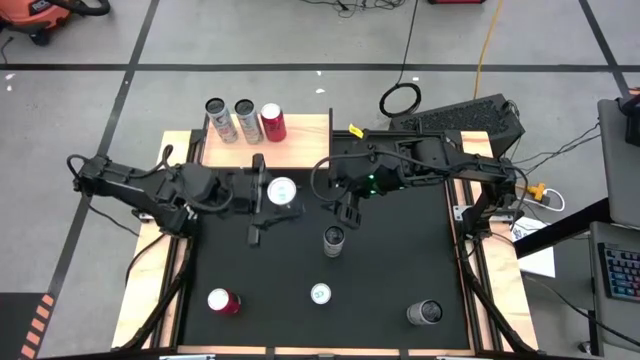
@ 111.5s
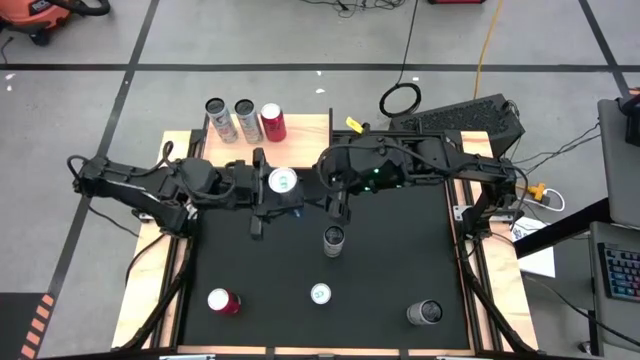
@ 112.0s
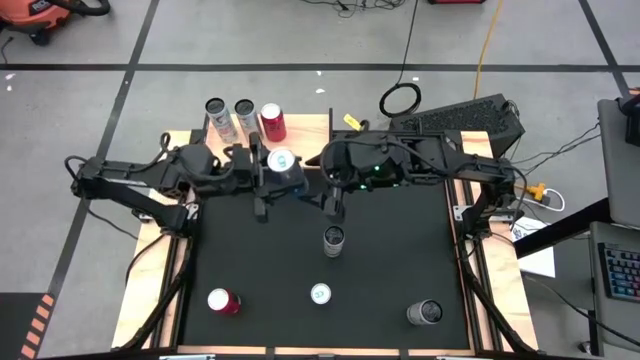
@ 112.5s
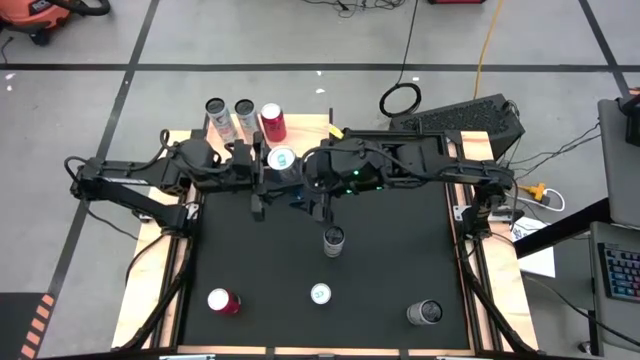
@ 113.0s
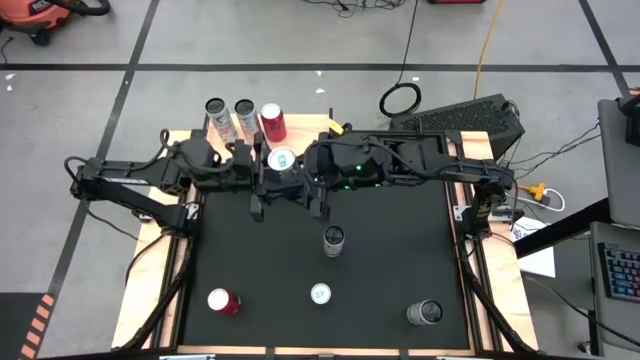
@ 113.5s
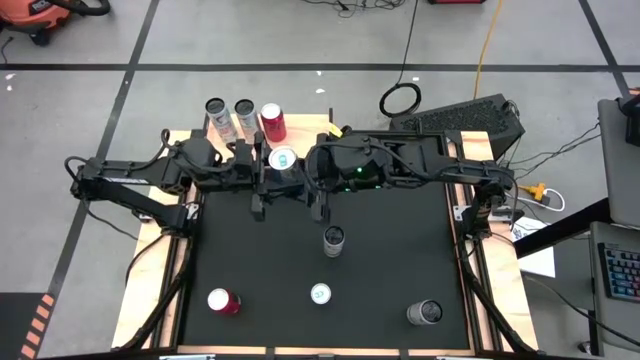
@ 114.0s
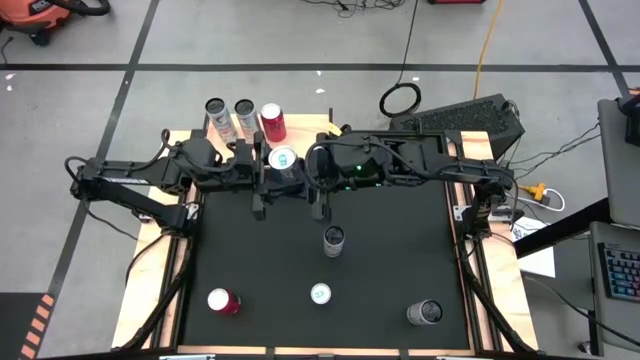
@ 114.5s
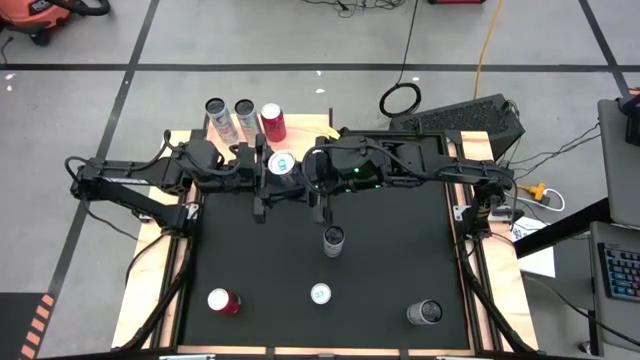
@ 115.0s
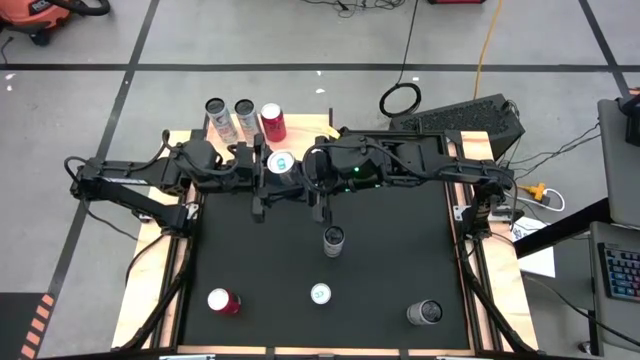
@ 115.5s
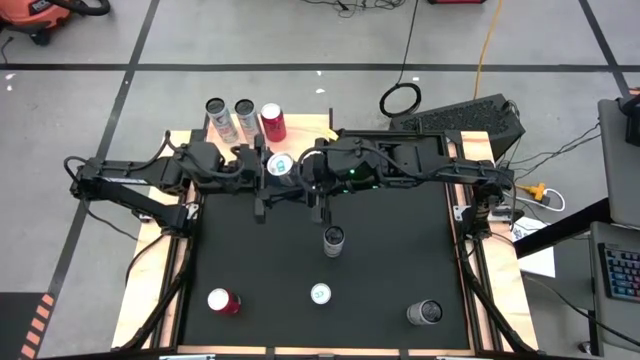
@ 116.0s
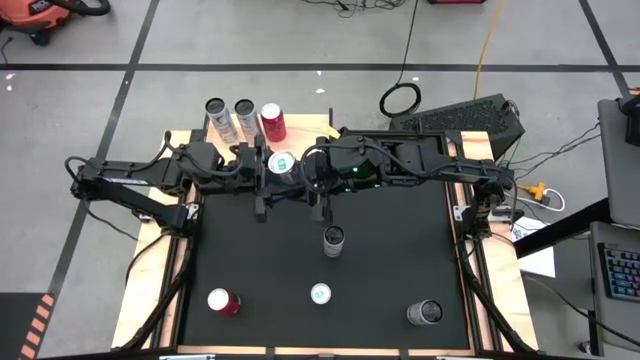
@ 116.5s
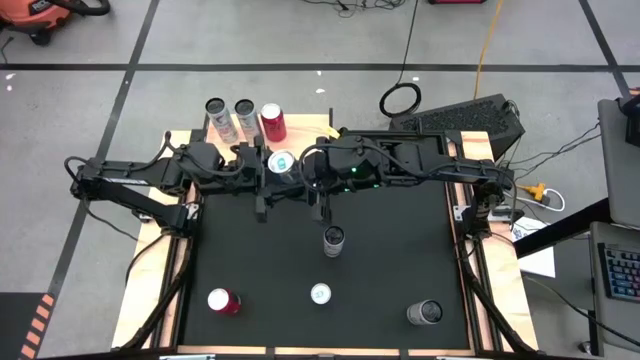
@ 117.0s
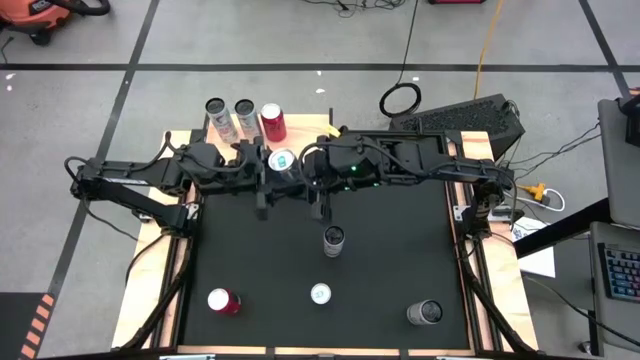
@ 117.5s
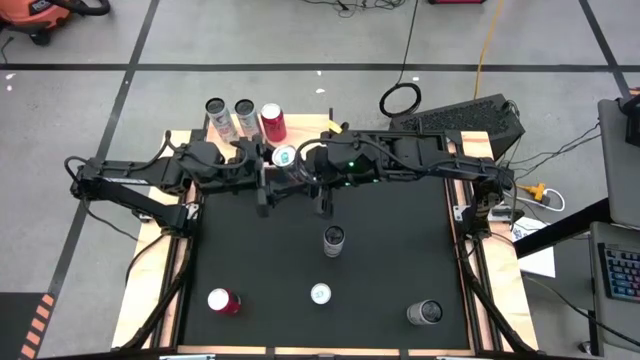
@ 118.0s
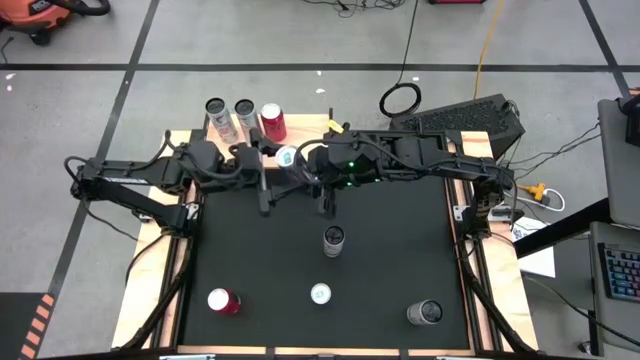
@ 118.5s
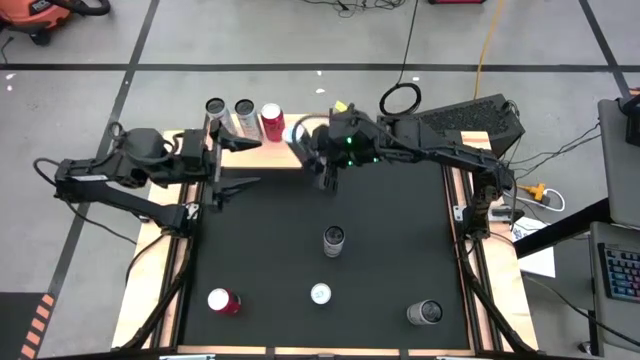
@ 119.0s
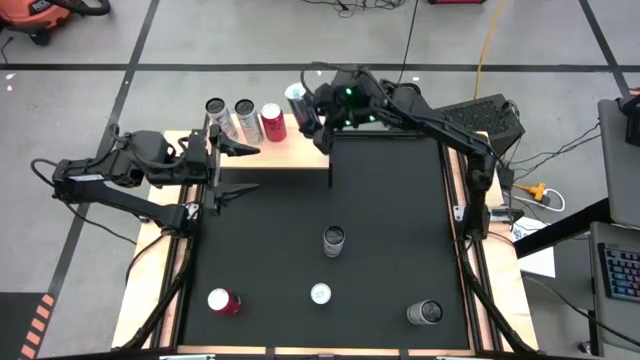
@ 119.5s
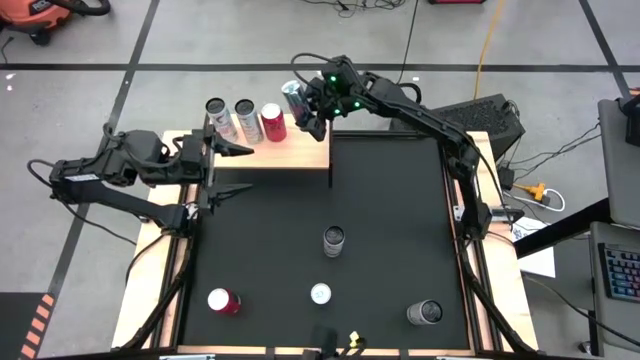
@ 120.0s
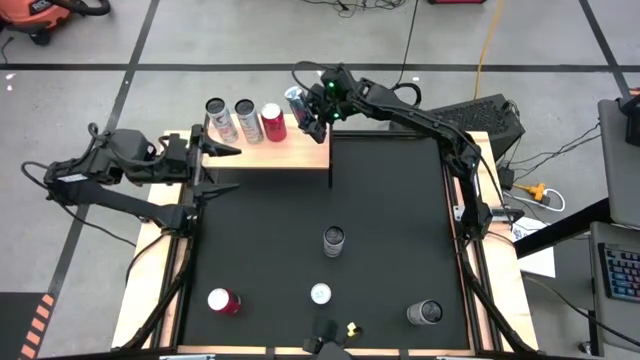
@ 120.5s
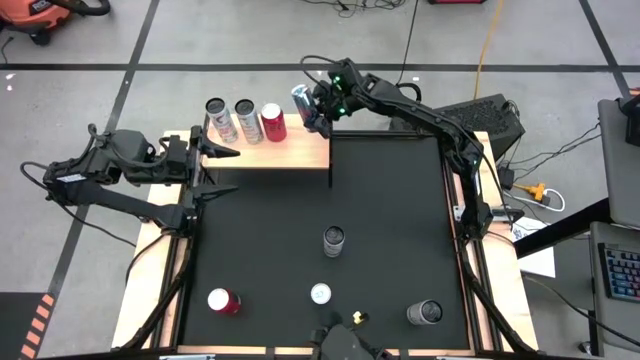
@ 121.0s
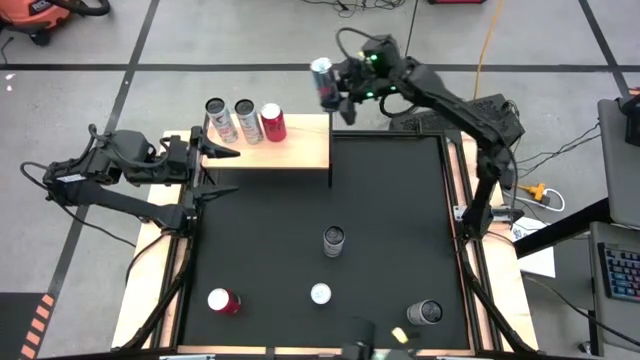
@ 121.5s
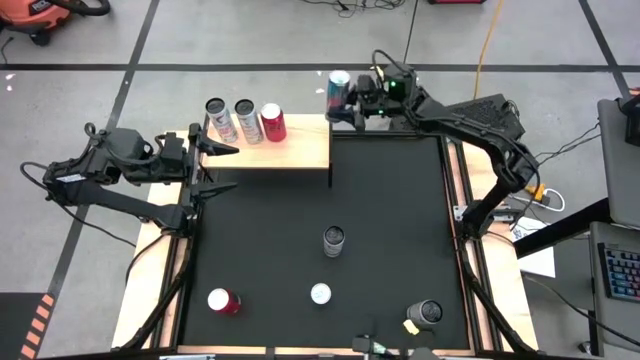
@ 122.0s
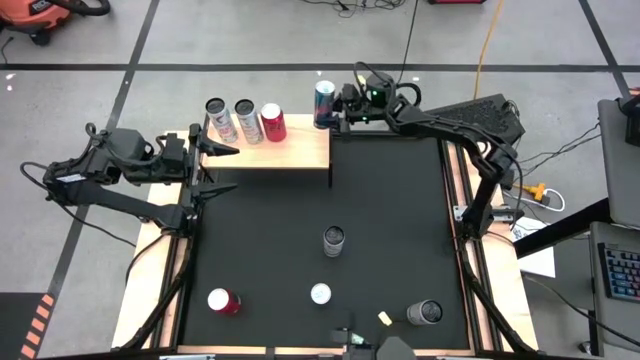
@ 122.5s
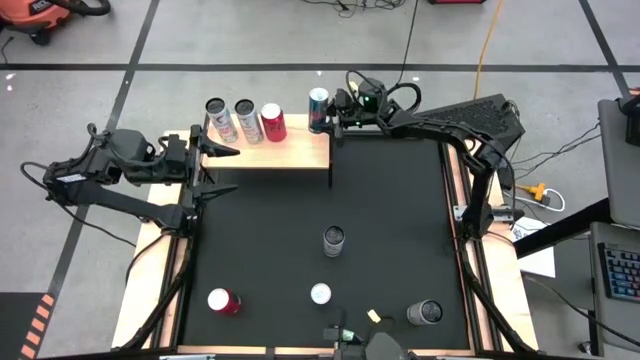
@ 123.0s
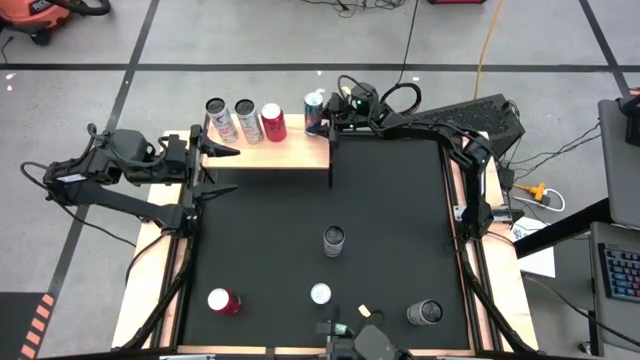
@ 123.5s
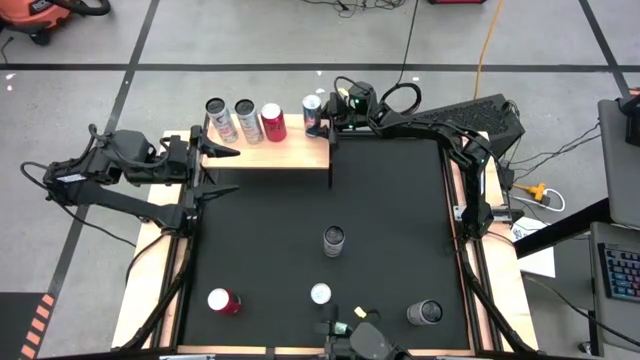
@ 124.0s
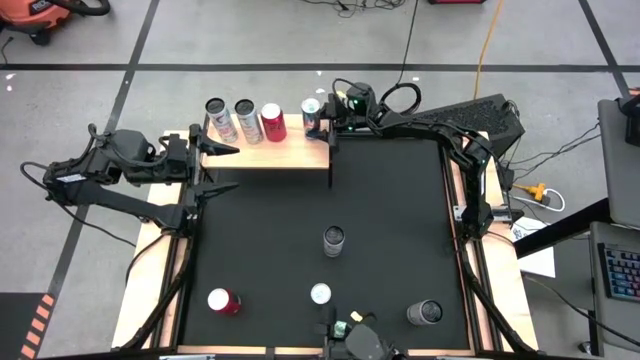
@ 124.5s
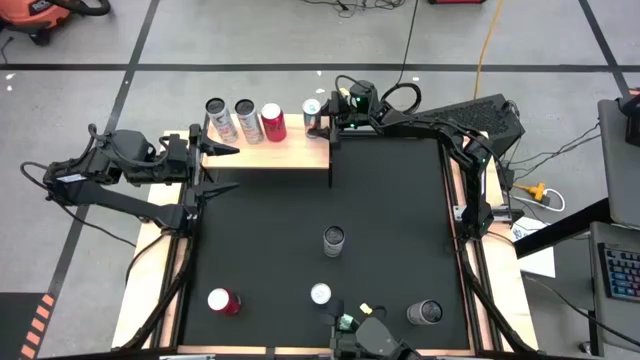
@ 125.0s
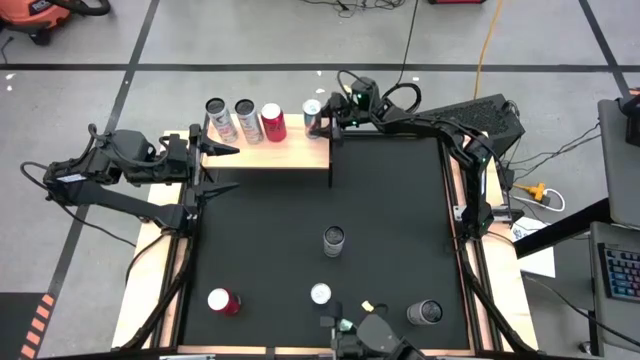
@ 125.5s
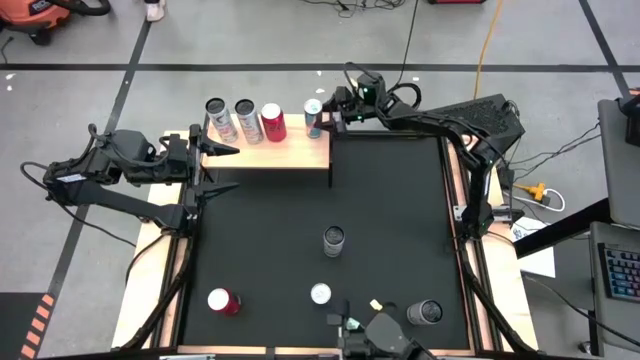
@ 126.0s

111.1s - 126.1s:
Task: Place canned beverage on shelf
Put the top blue soda can on the shelf

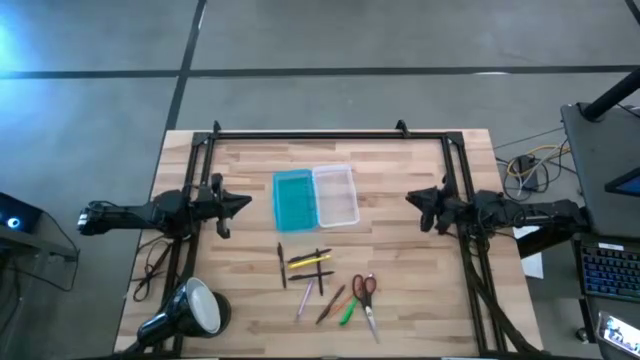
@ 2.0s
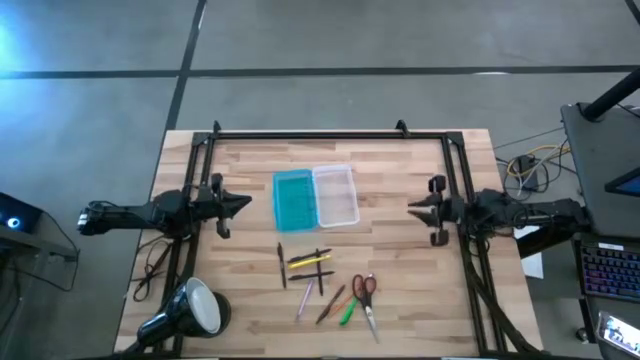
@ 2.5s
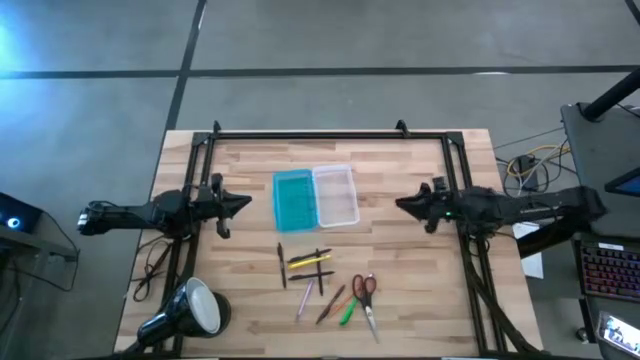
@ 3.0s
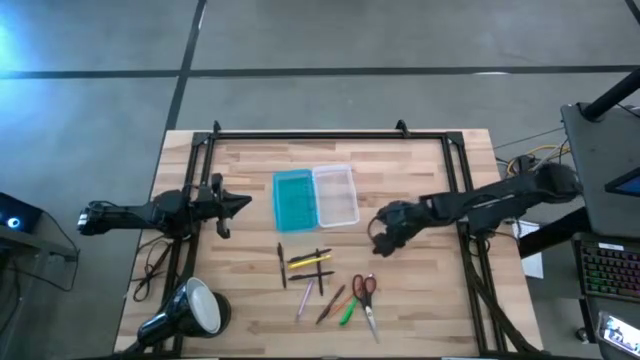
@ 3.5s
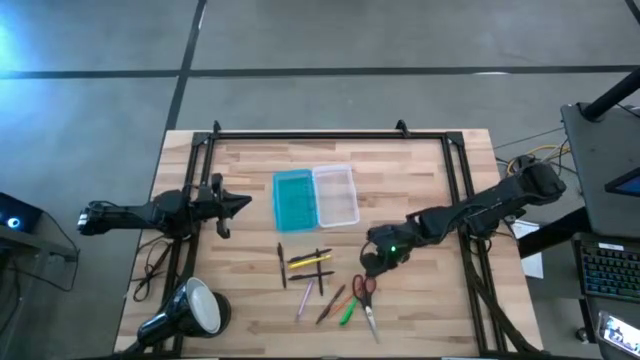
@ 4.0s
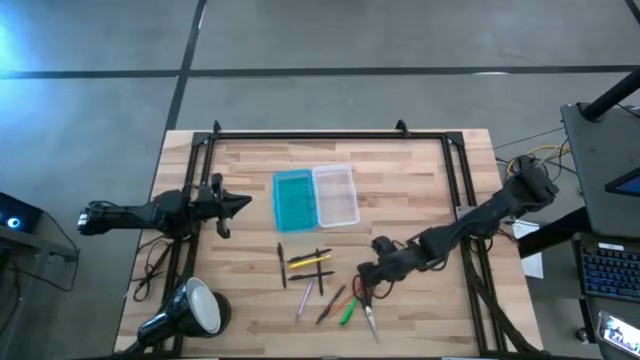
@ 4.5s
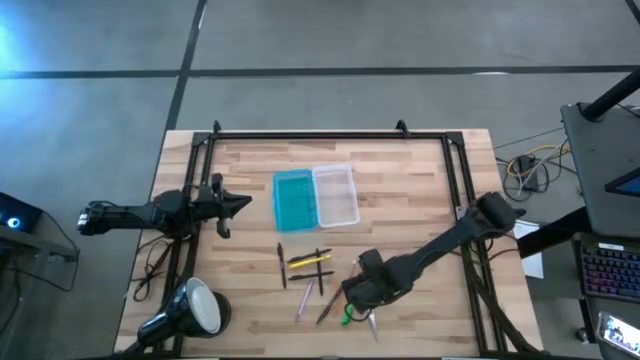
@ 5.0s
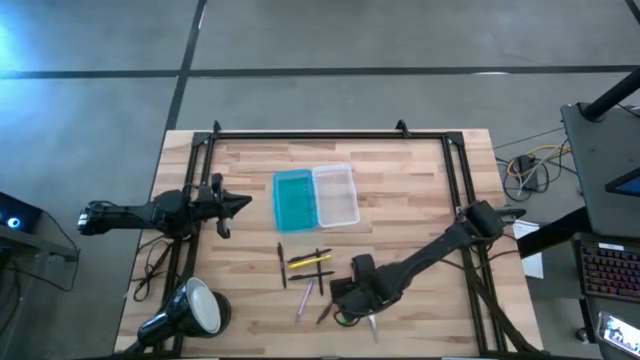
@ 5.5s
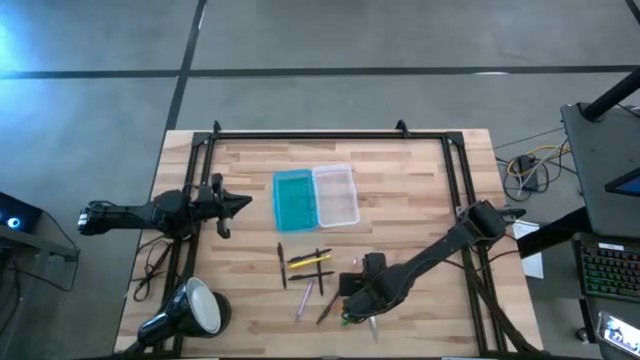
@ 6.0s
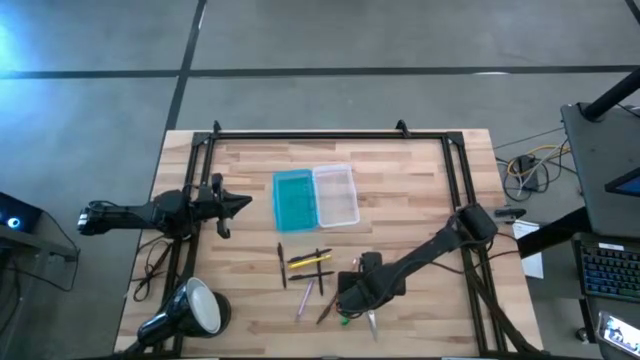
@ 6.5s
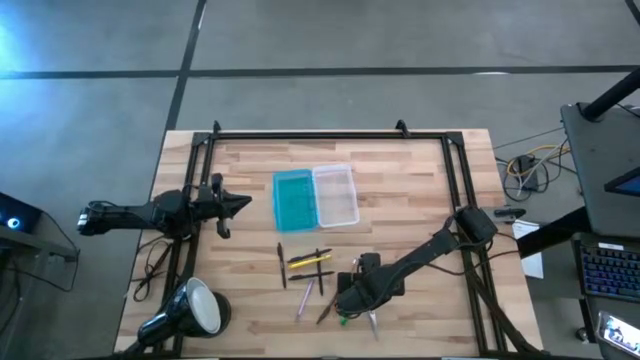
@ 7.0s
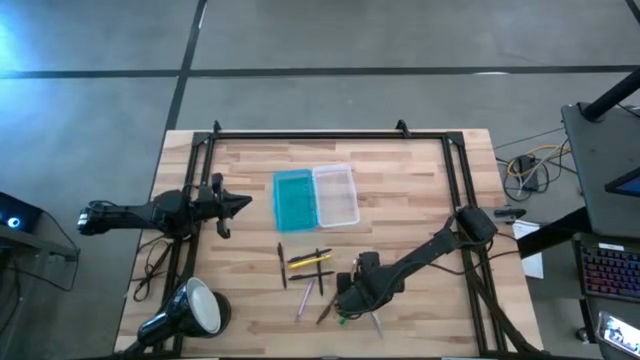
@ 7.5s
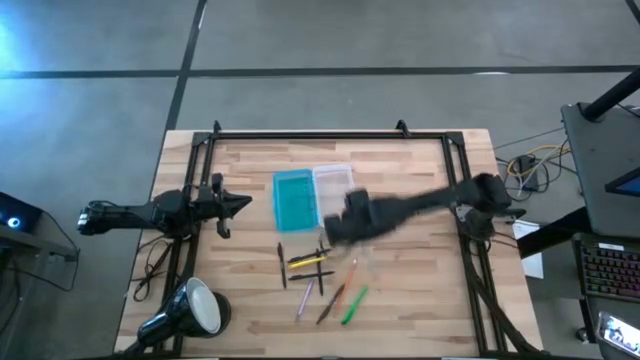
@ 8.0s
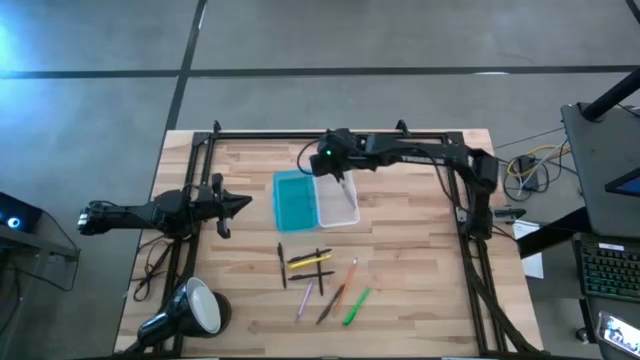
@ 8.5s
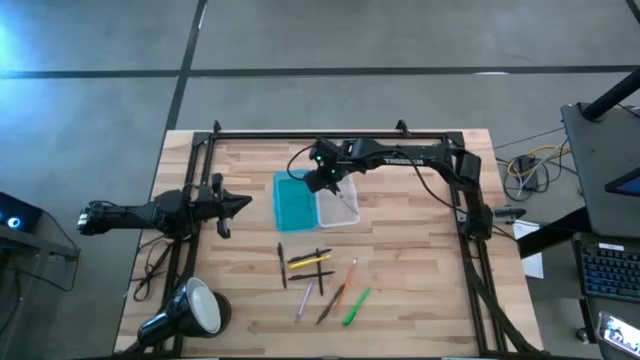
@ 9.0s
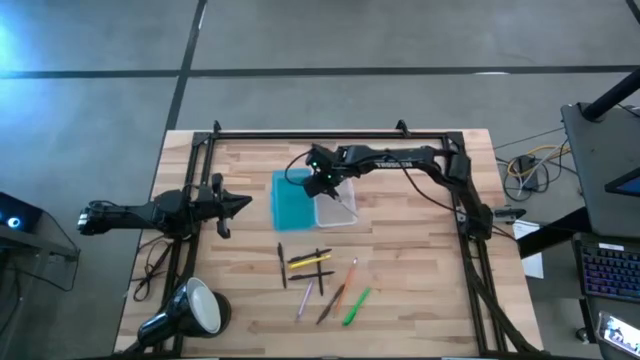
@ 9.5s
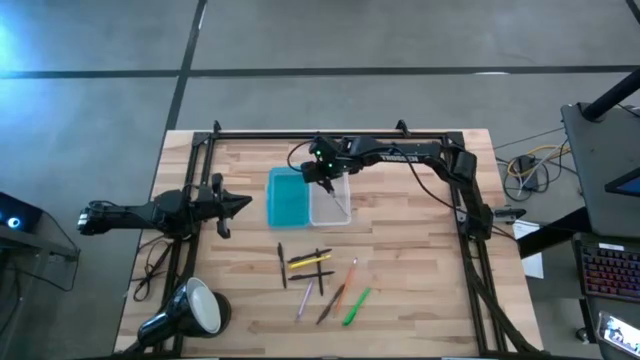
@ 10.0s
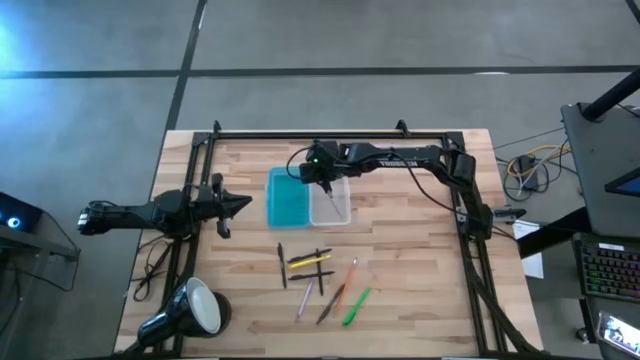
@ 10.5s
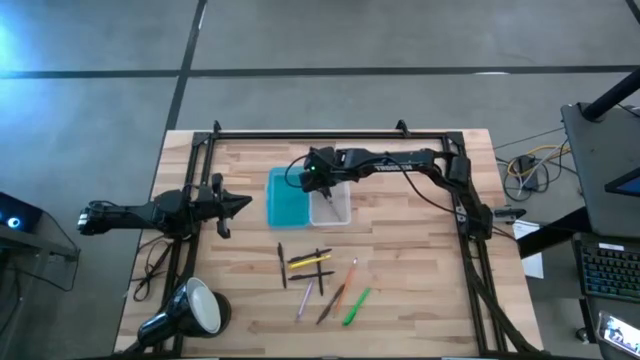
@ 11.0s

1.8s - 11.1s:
Task: Pick & place school supplies into a supply box
Put the black scissors into the blue supply box
